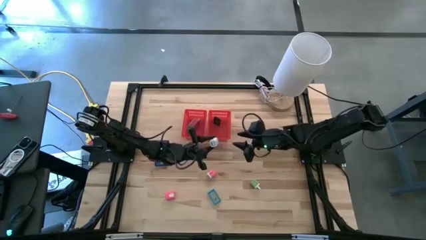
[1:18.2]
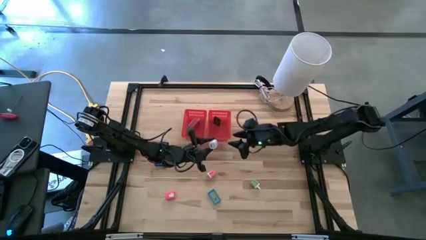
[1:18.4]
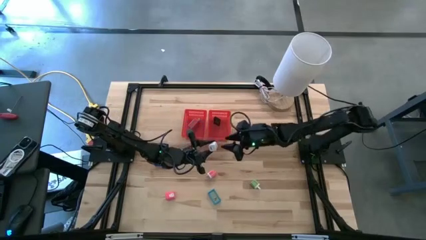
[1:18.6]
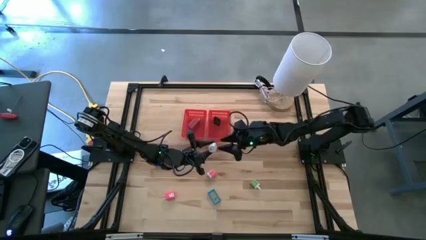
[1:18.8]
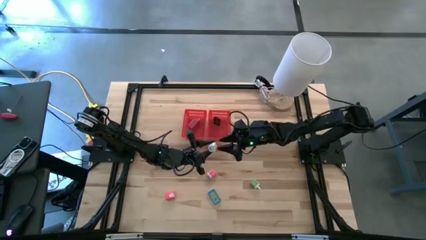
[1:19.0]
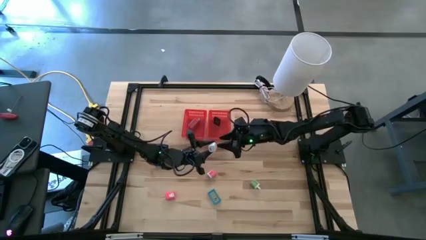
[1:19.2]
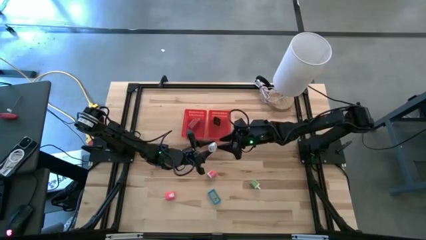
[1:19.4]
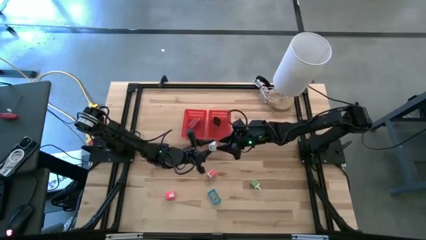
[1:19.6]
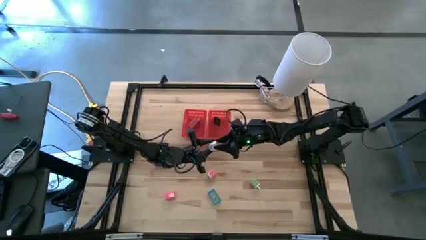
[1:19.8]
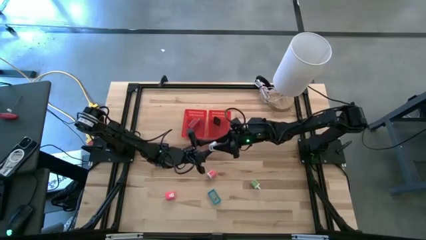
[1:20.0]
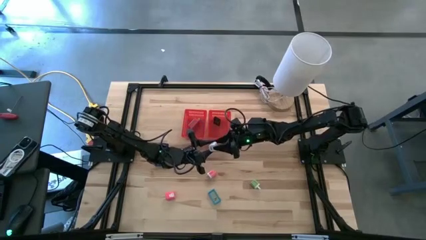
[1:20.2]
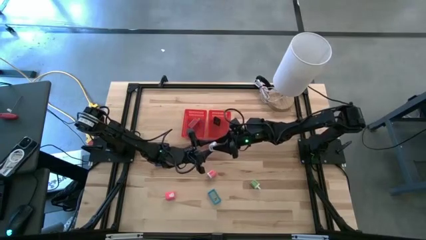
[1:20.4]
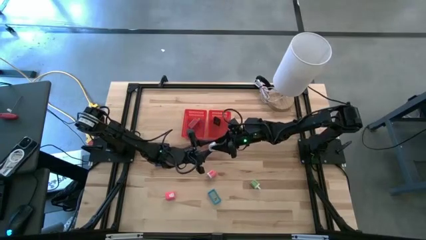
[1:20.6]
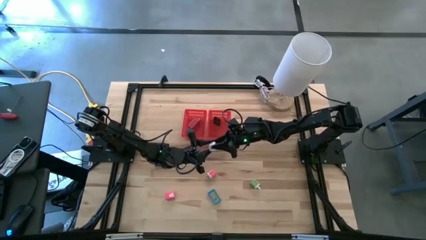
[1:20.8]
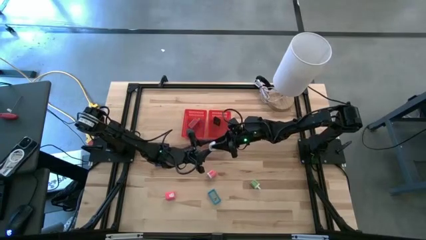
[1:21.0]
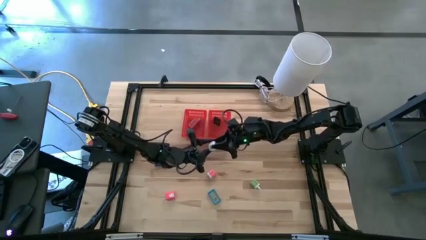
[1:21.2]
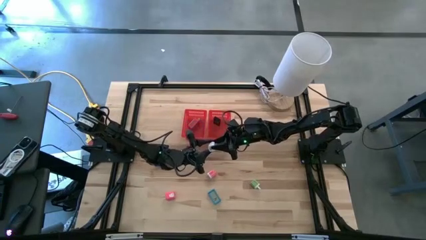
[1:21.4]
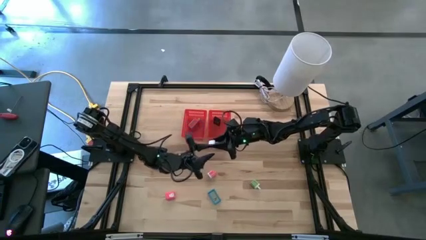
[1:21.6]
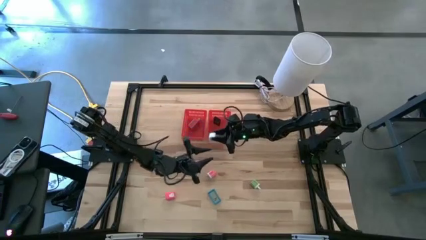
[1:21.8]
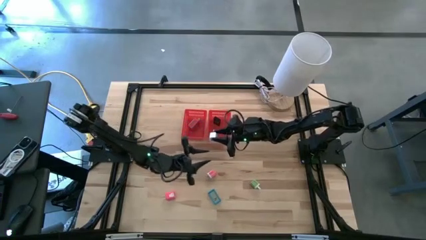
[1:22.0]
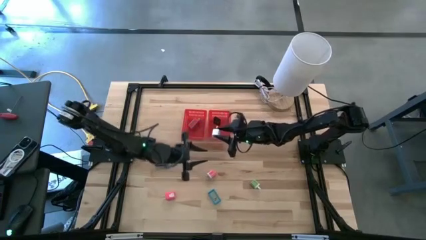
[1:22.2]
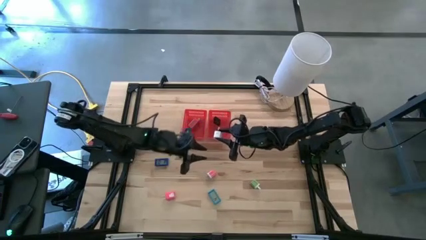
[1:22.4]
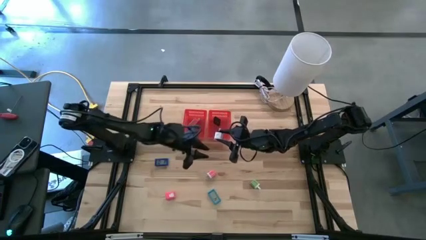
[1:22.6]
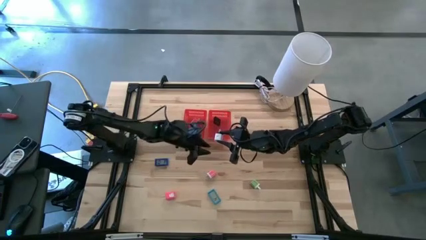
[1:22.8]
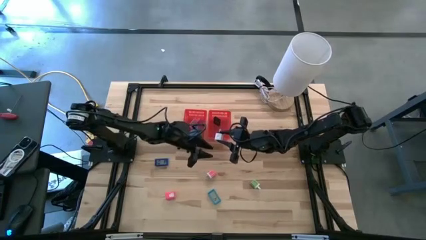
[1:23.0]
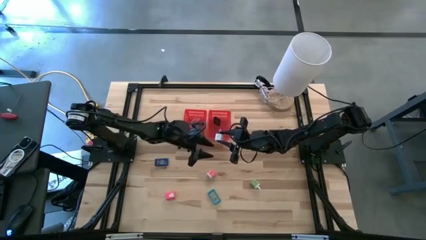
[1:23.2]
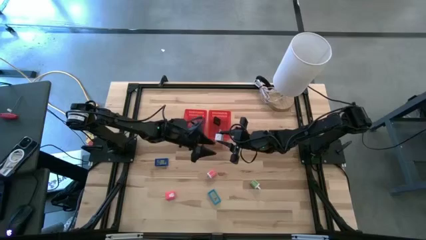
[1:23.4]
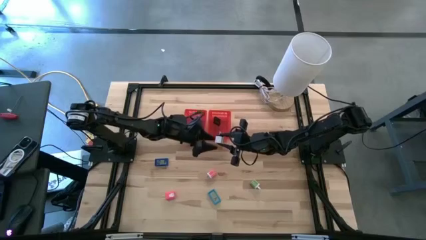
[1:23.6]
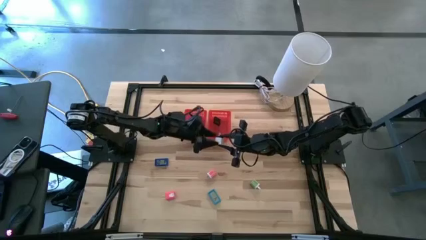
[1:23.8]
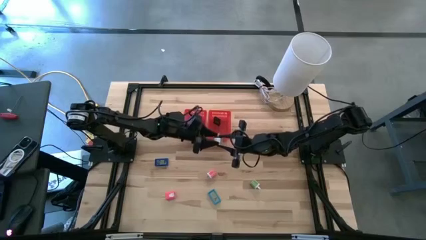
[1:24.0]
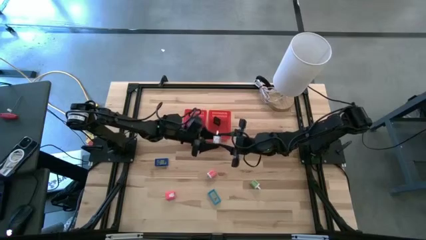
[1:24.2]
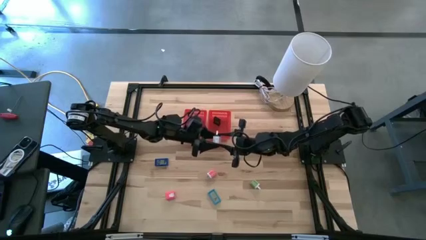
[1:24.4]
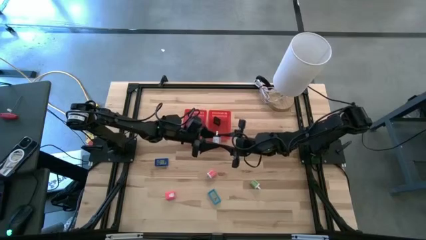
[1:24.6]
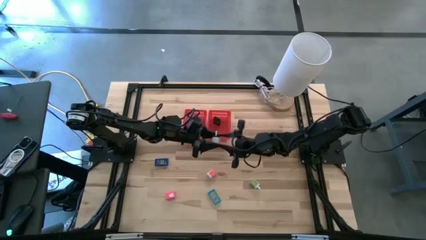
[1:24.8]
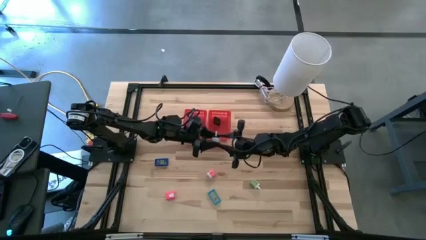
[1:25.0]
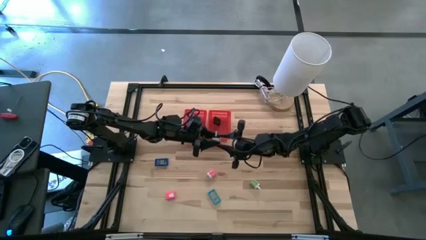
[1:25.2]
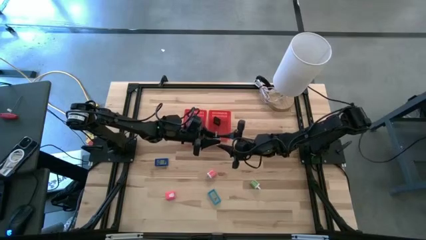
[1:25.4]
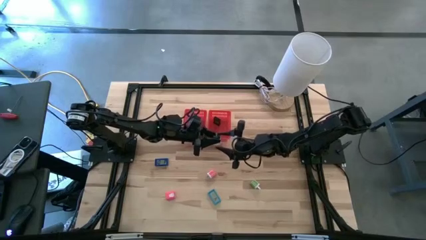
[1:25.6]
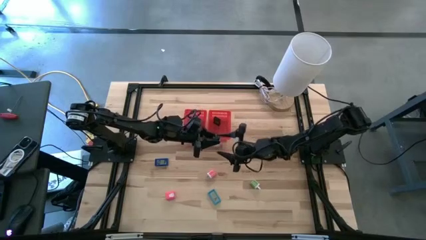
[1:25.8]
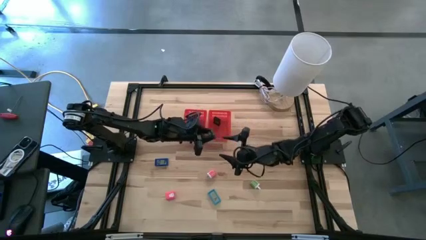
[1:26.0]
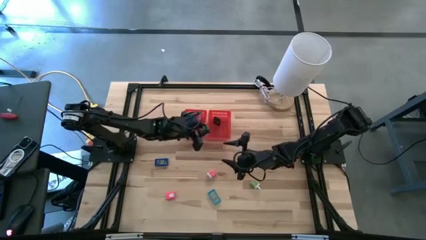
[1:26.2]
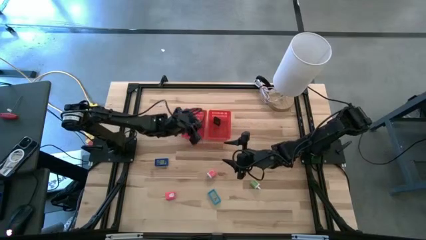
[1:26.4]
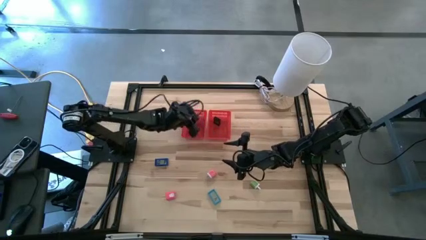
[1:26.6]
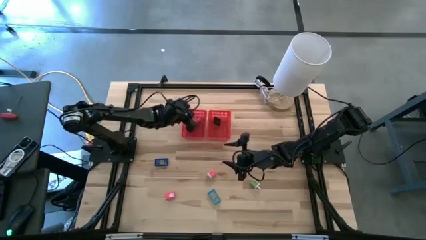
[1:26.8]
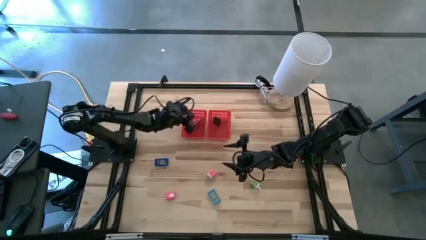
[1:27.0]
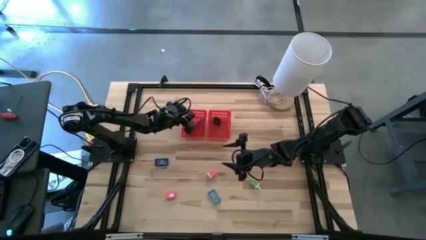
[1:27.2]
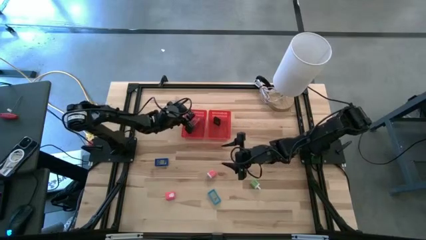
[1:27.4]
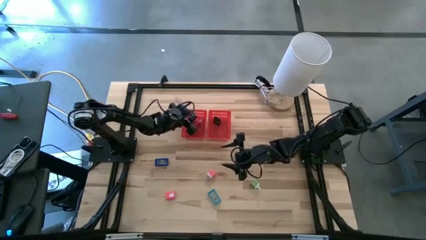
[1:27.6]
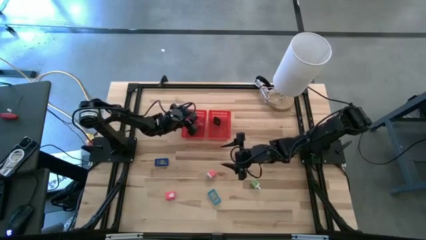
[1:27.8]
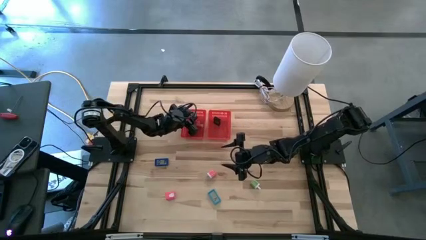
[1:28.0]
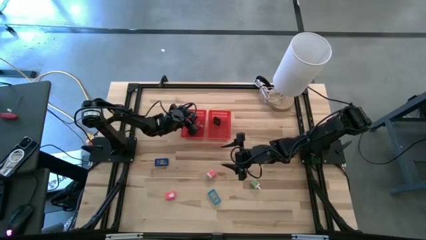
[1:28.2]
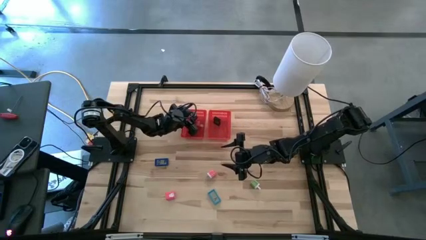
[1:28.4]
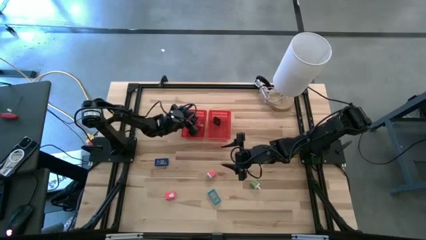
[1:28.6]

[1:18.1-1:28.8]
Task: Pick & Place Office items
Put the white charger adapter into the left red bin

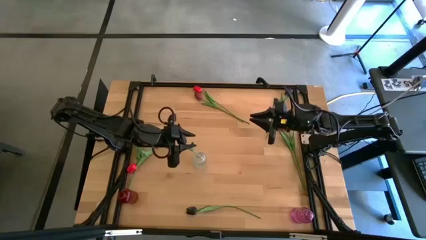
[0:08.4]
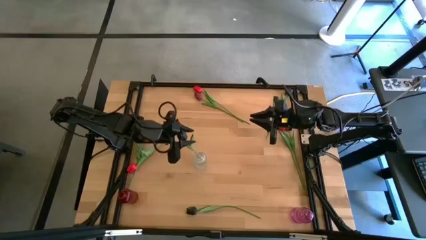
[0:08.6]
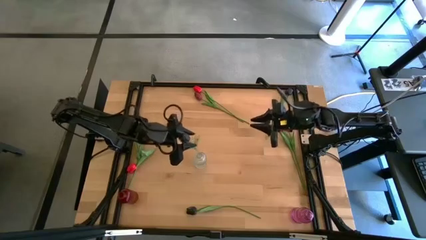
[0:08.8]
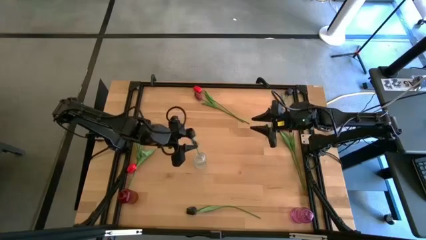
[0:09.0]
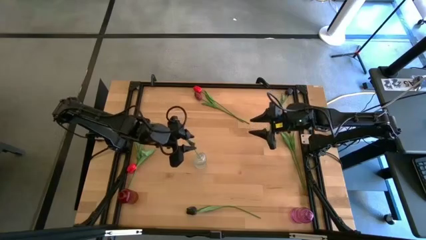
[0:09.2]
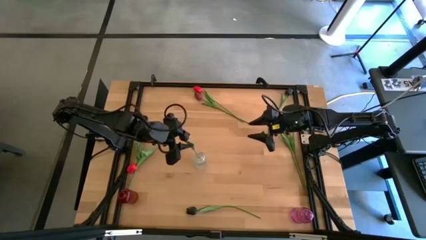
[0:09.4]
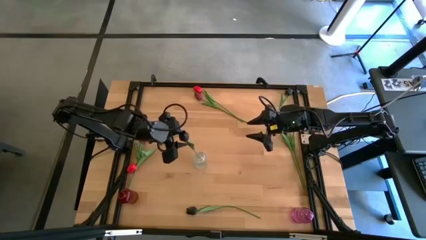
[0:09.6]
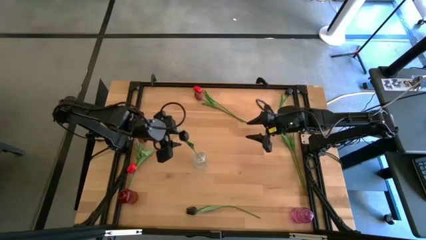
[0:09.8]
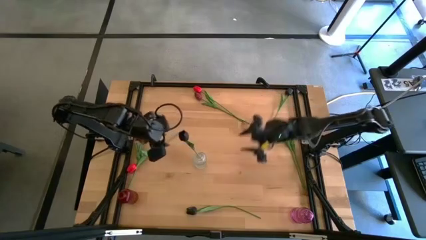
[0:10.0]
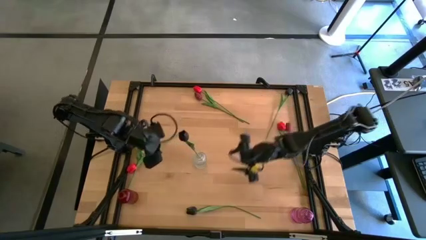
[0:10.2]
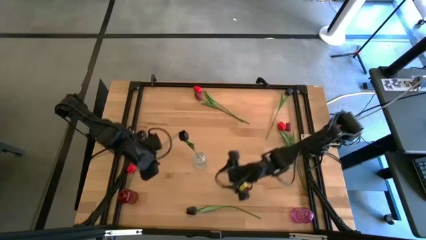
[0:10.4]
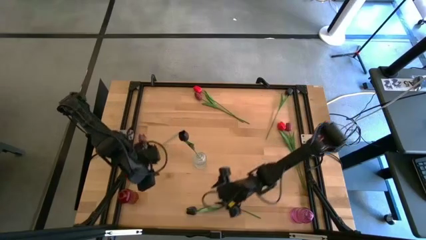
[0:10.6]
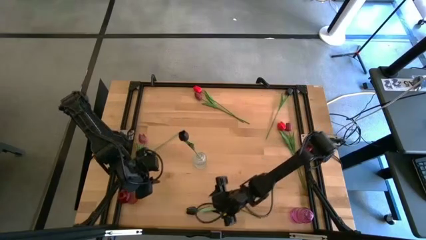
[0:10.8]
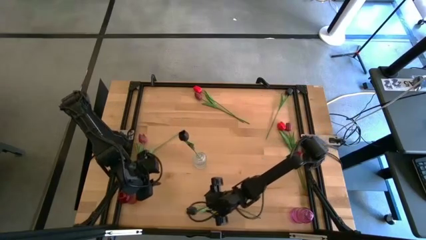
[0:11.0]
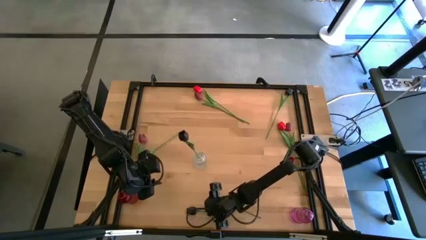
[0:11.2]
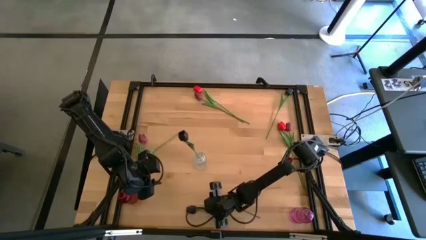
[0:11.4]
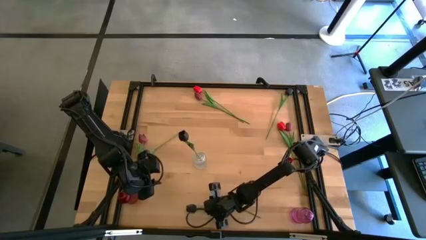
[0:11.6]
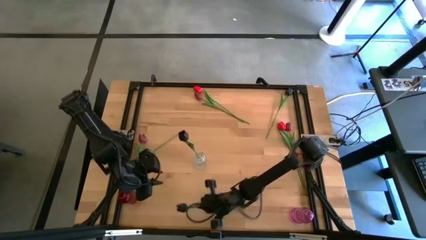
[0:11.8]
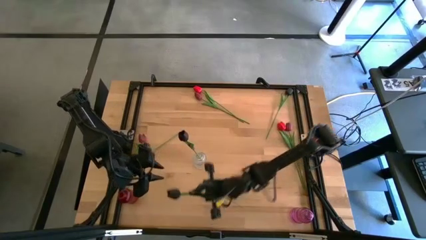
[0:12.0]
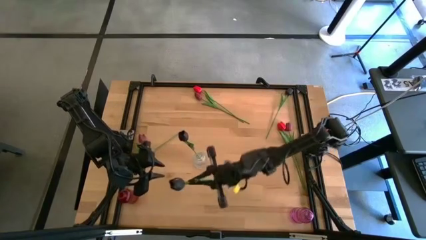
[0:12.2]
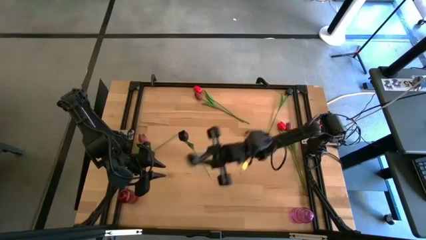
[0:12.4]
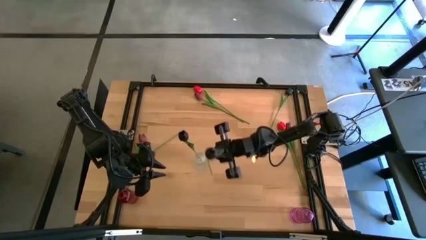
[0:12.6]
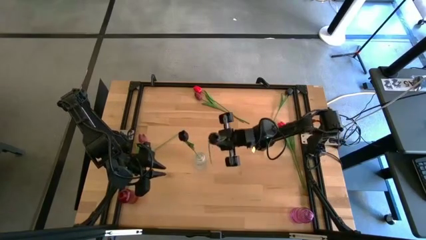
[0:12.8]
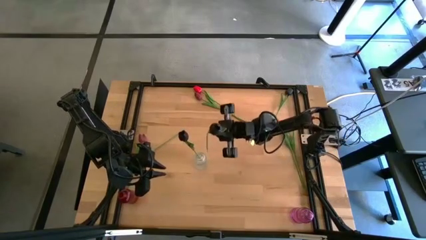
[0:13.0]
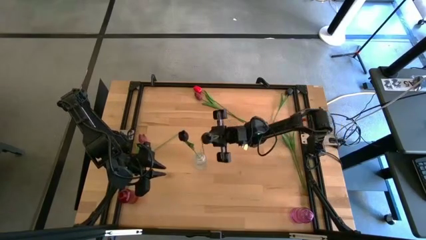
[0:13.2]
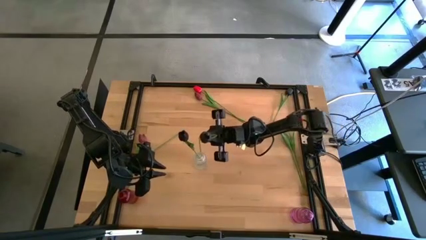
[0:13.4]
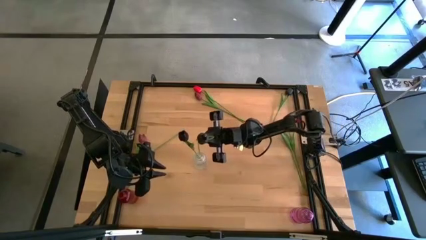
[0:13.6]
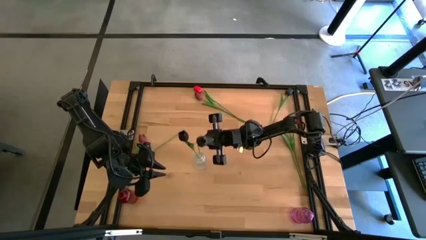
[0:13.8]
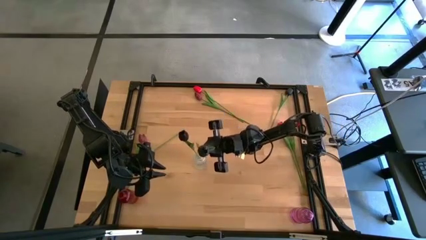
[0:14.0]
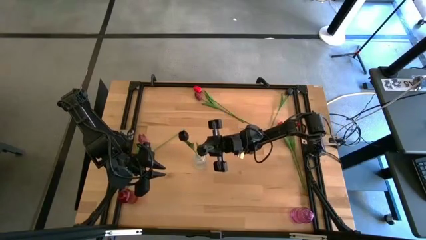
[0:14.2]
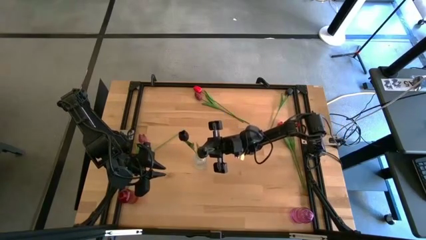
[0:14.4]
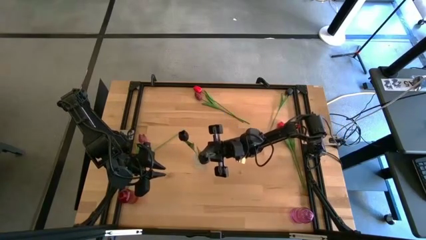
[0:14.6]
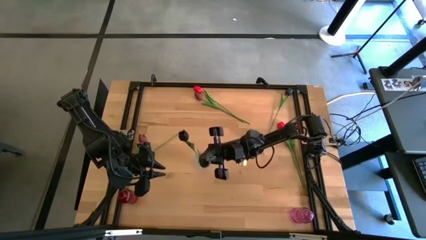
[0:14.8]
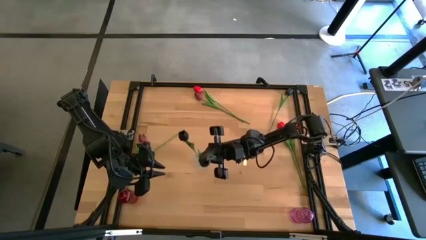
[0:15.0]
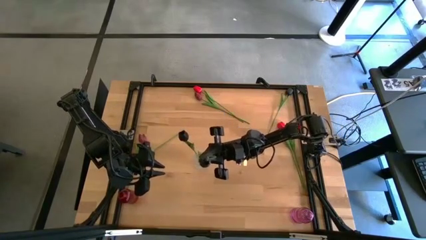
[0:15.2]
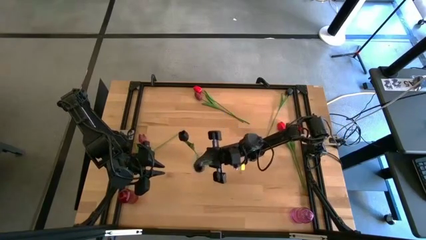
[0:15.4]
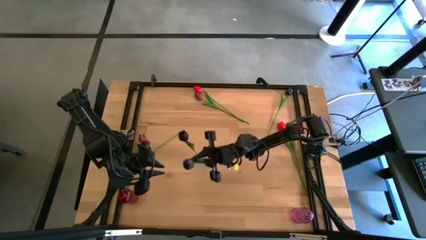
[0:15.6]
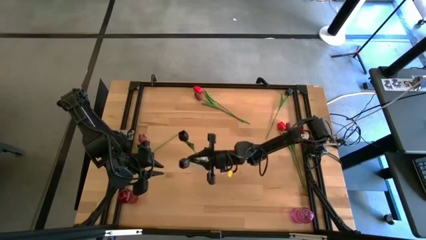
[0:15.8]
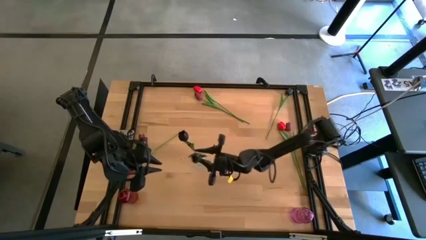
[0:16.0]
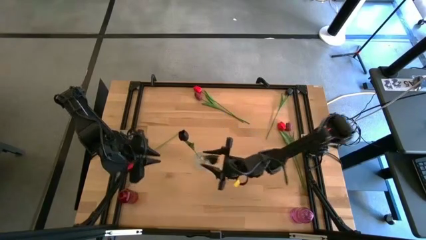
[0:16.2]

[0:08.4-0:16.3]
Task: Sort flowers into vase by color
Put the black flower into the transparent vase
